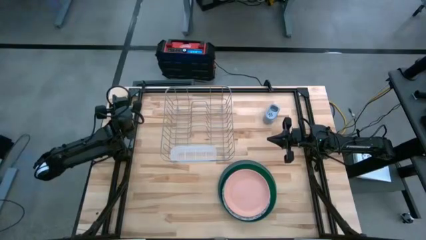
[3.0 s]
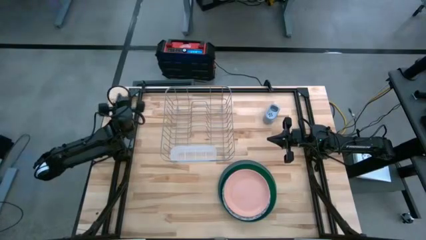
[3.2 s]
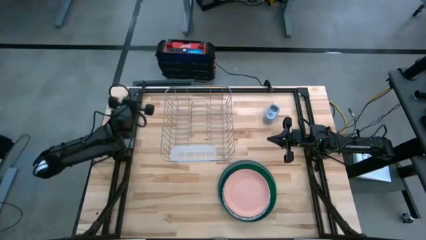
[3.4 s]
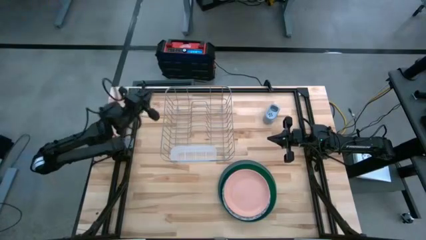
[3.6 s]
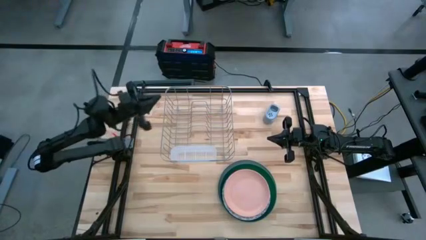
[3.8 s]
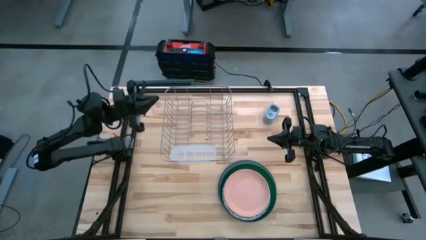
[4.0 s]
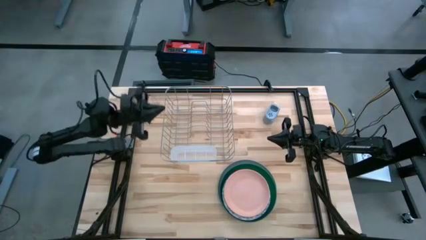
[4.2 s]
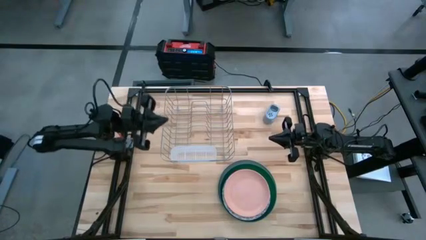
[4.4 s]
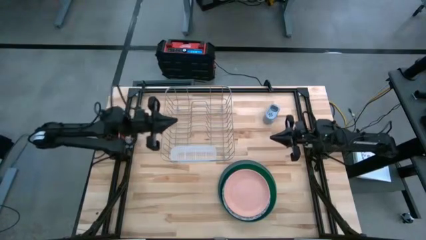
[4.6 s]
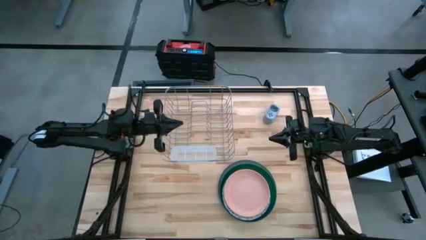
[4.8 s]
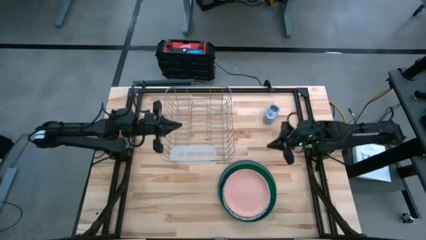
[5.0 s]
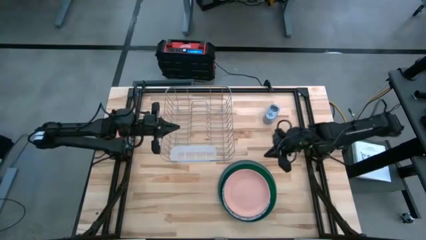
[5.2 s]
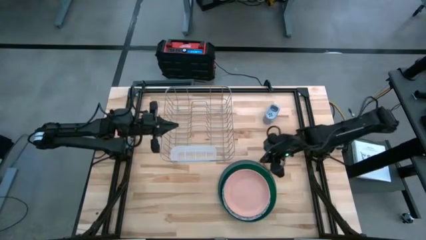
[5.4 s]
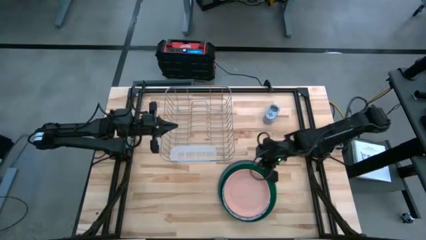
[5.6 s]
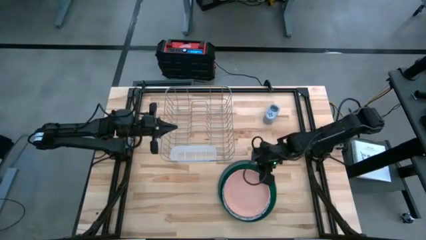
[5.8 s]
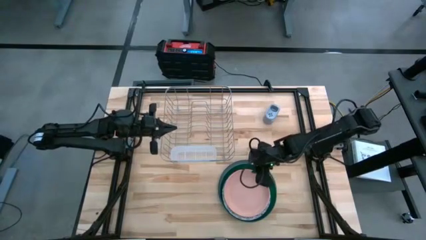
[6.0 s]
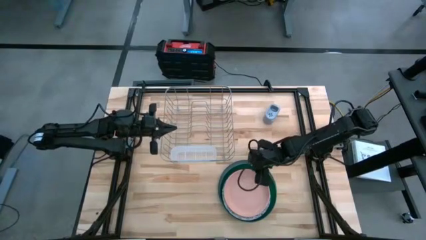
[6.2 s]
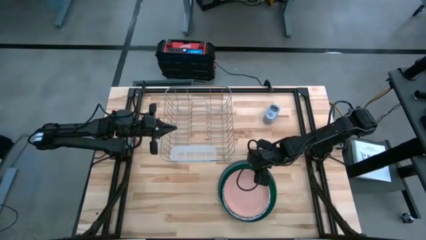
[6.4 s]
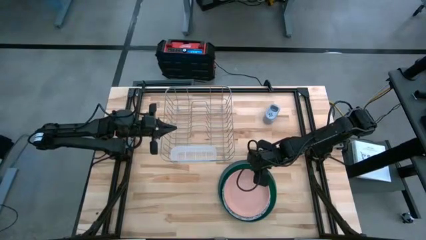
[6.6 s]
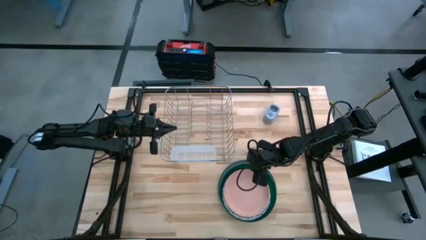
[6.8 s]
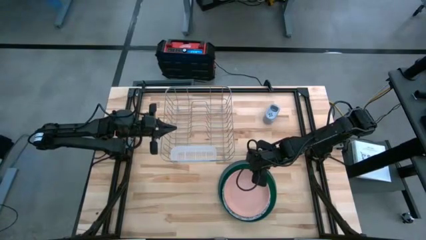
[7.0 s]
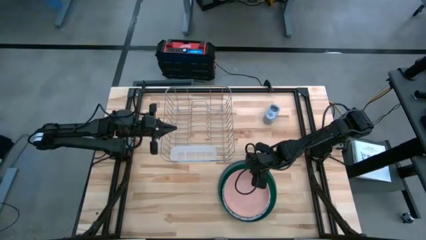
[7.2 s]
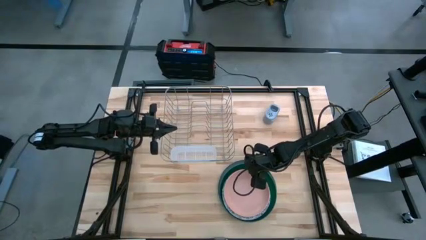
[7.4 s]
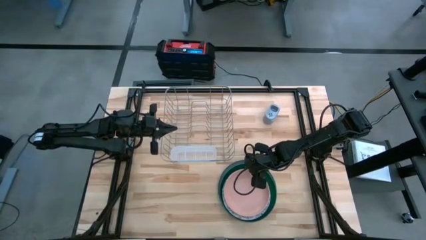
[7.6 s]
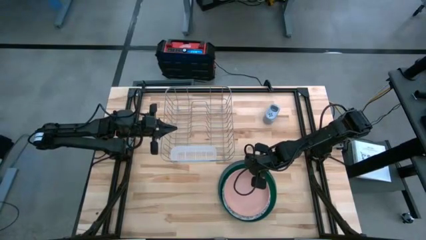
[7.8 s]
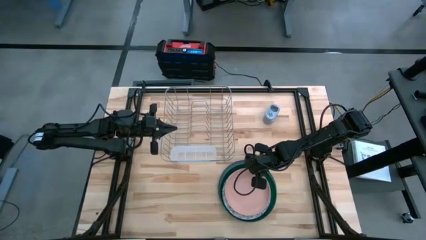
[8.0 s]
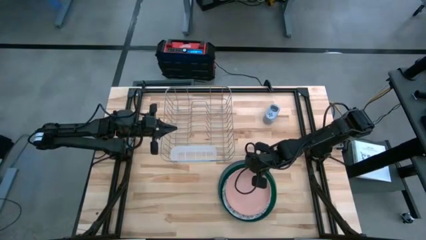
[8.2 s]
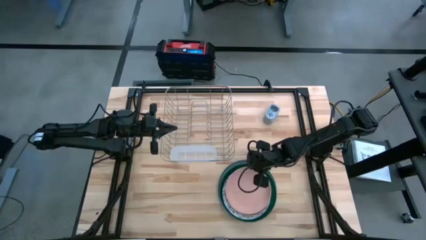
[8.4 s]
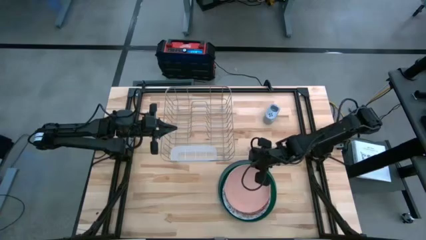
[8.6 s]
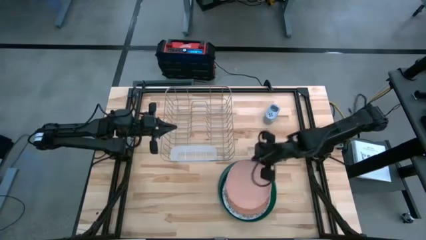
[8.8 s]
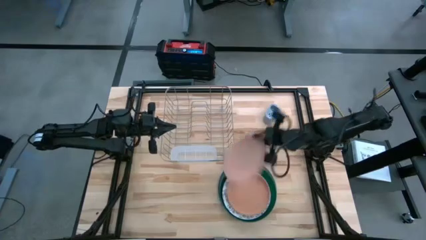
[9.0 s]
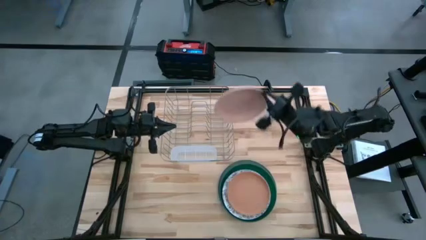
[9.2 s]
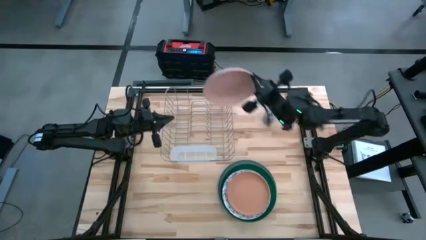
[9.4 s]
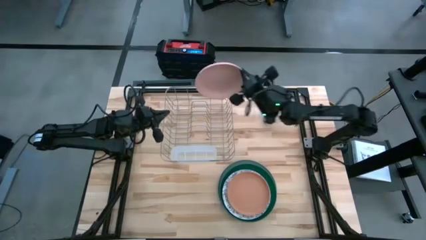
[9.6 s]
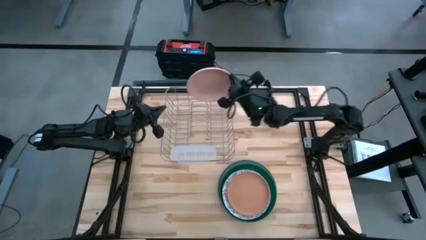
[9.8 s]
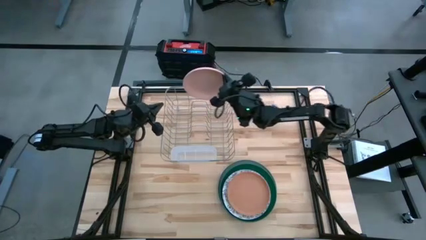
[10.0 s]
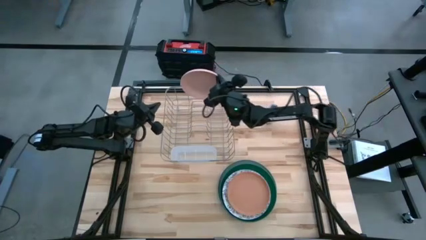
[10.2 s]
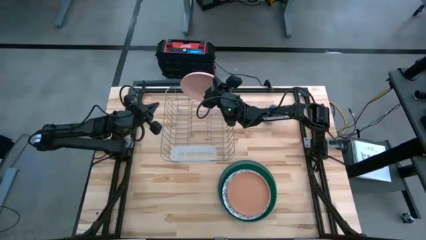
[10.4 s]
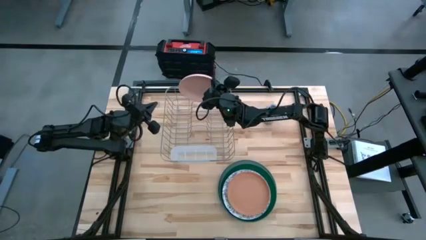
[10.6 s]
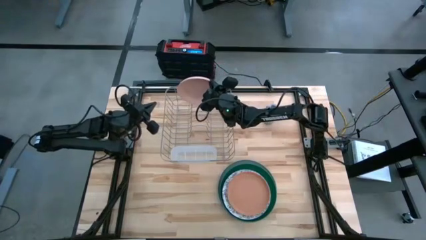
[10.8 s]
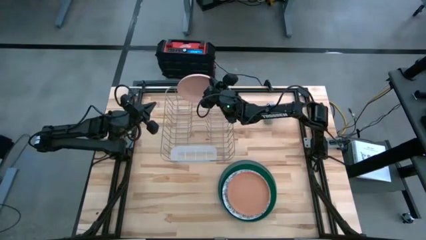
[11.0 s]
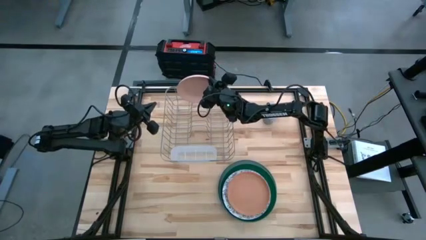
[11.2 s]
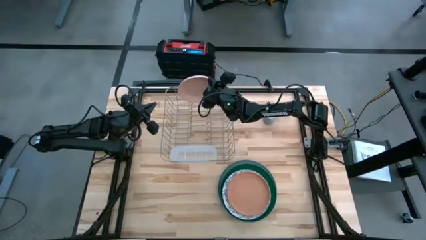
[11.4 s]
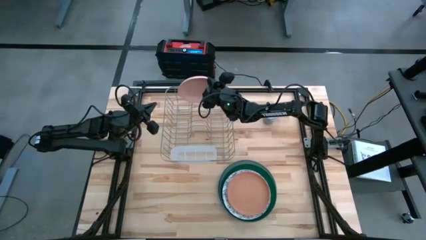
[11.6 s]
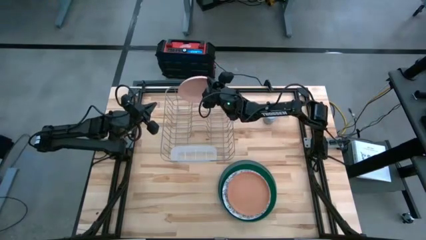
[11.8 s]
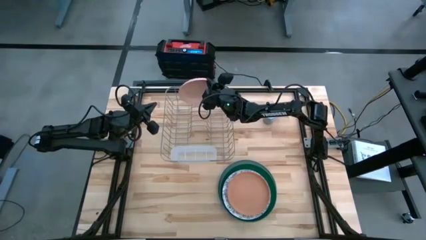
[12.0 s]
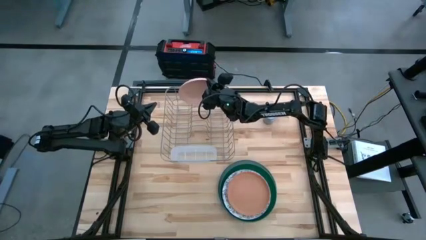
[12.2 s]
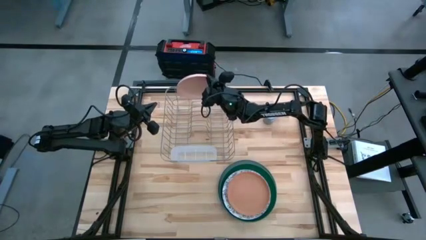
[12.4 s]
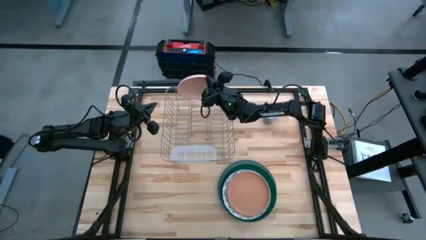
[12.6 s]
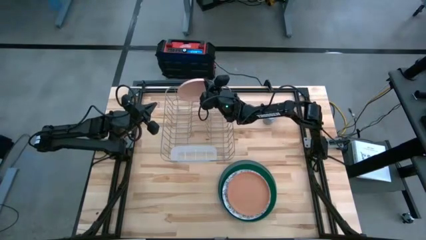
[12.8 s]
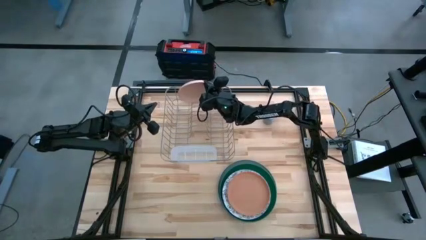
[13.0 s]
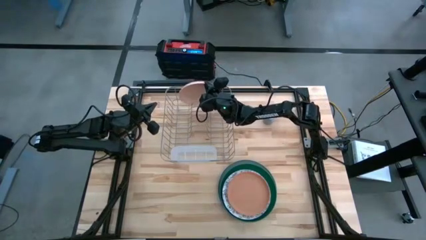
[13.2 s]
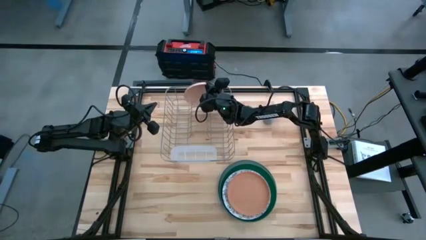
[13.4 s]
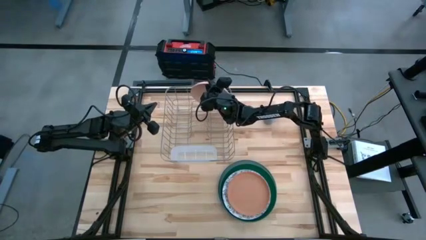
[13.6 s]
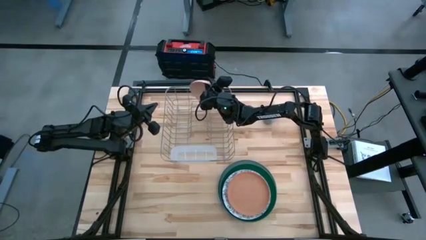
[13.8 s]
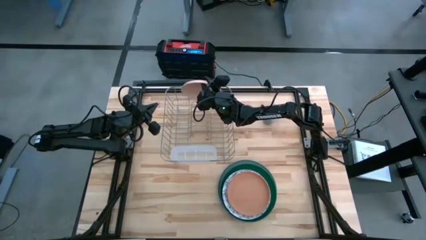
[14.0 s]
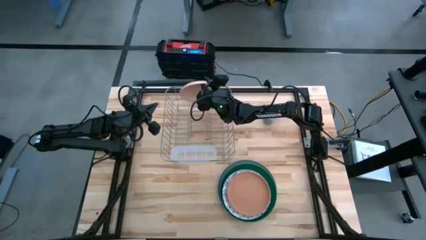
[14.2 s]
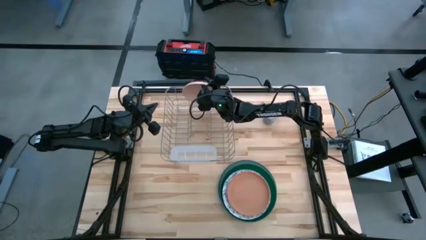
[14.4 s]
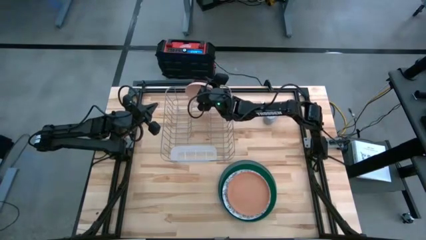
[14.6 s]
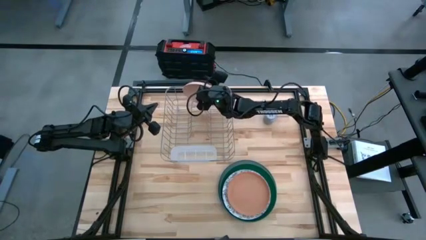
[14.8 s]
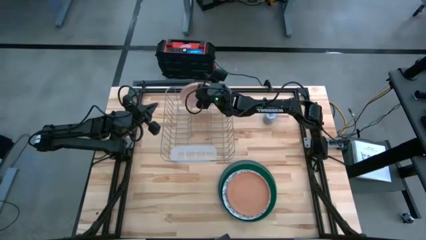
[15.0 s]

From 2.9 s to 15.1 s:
Task: Sort dishes
Put the pink plate in the dish rack
